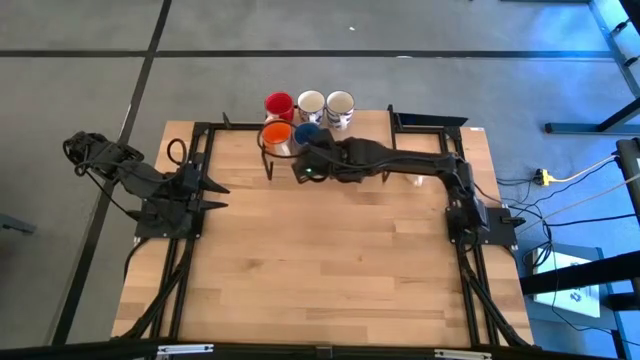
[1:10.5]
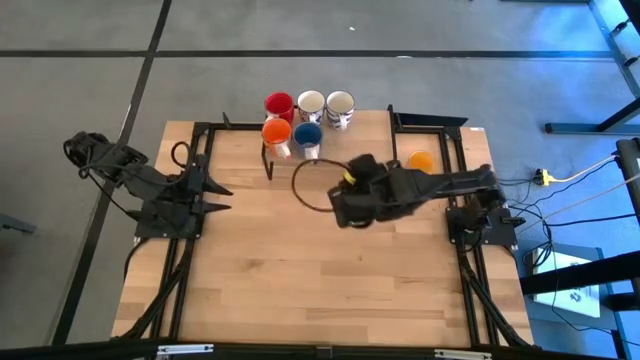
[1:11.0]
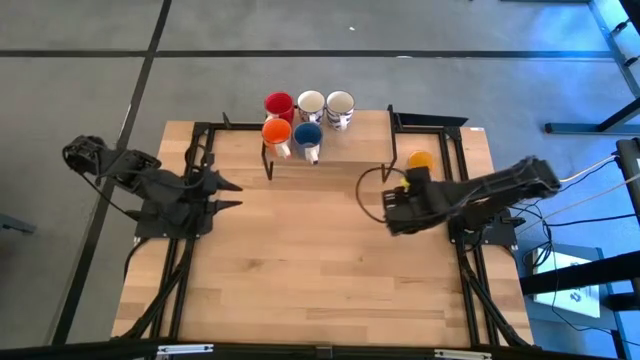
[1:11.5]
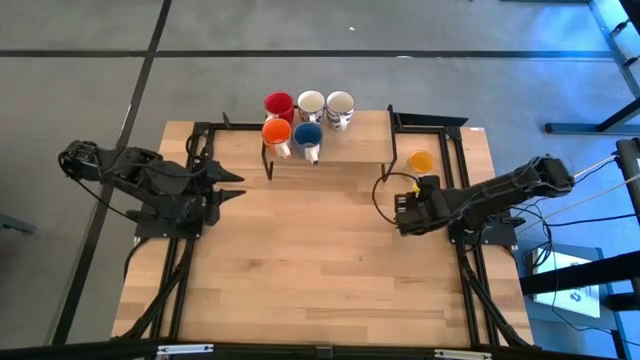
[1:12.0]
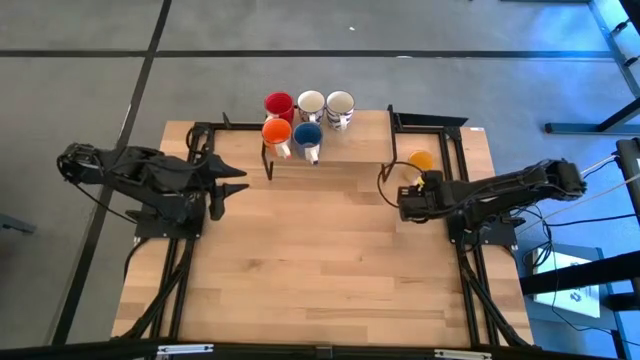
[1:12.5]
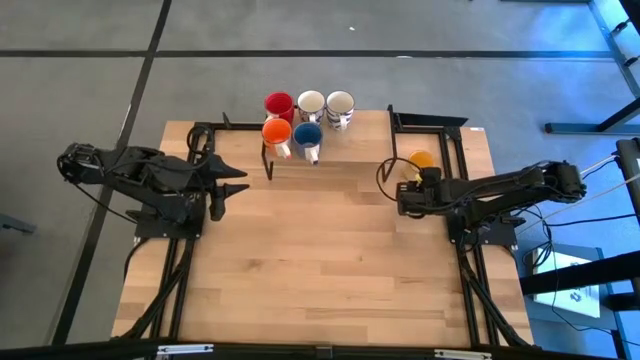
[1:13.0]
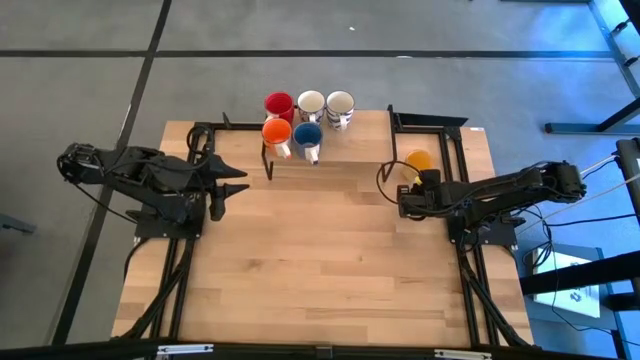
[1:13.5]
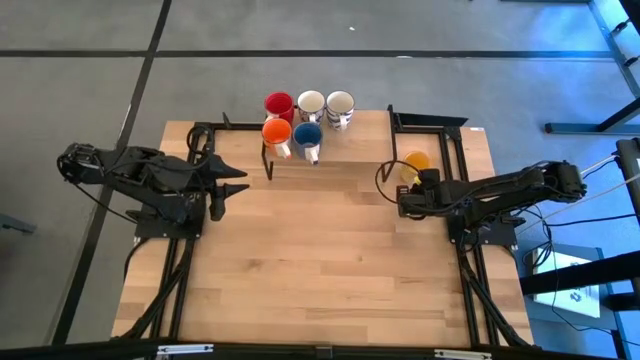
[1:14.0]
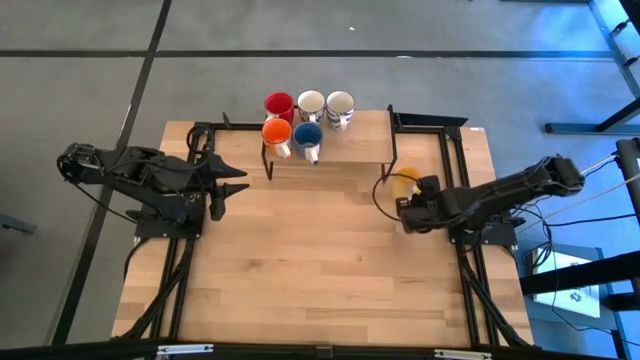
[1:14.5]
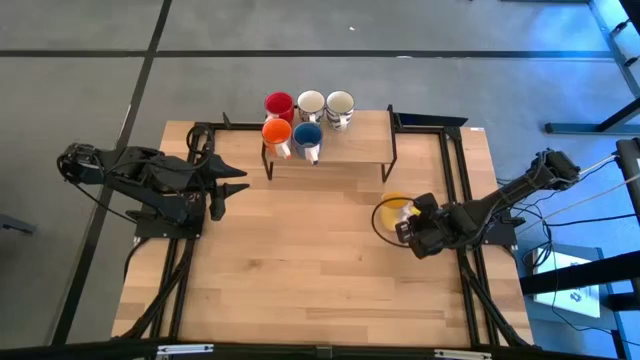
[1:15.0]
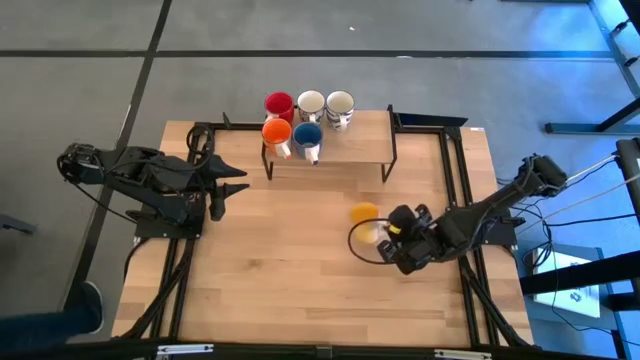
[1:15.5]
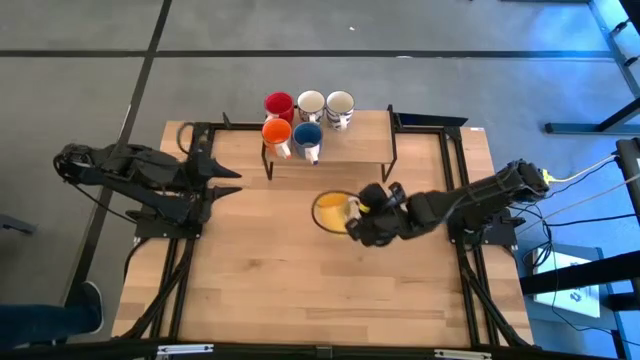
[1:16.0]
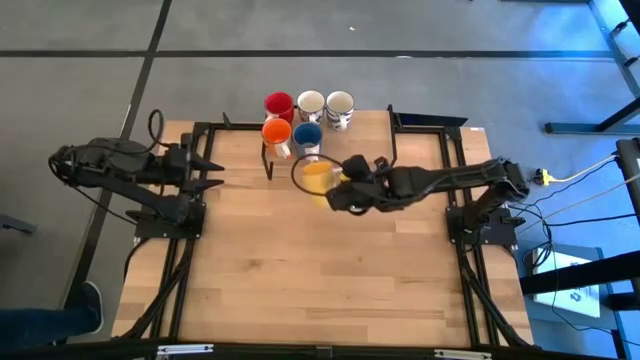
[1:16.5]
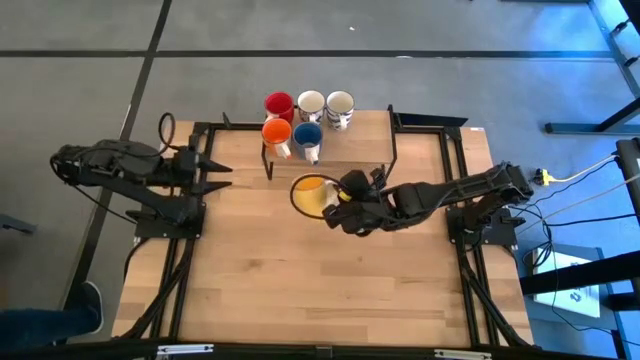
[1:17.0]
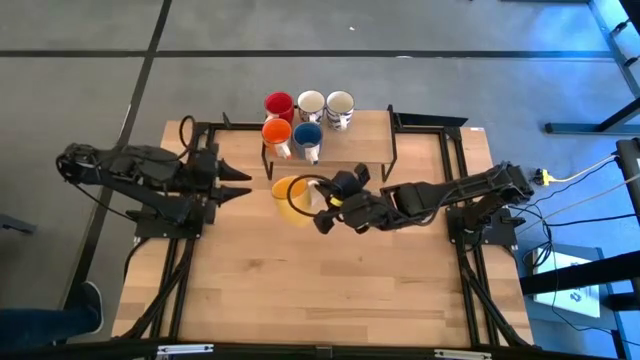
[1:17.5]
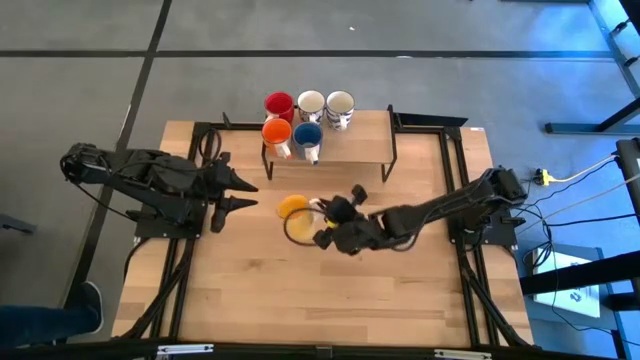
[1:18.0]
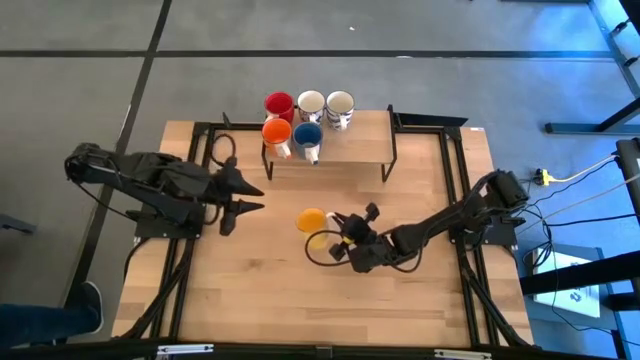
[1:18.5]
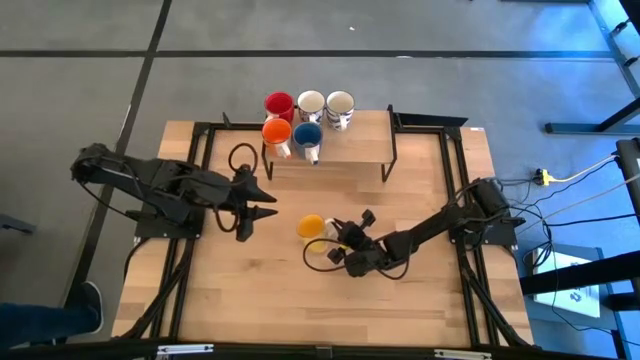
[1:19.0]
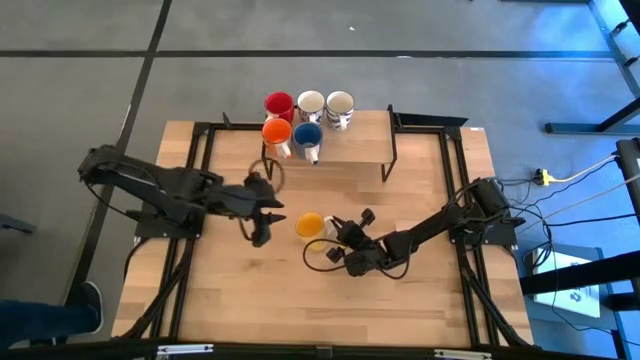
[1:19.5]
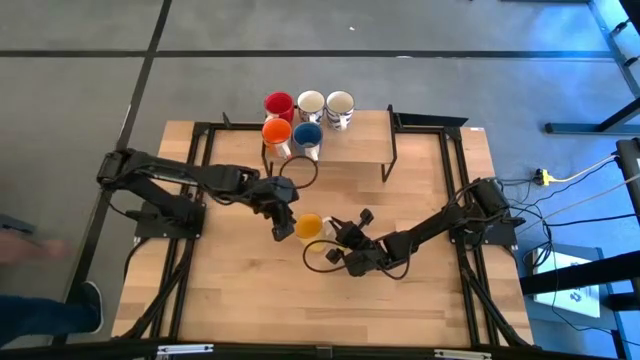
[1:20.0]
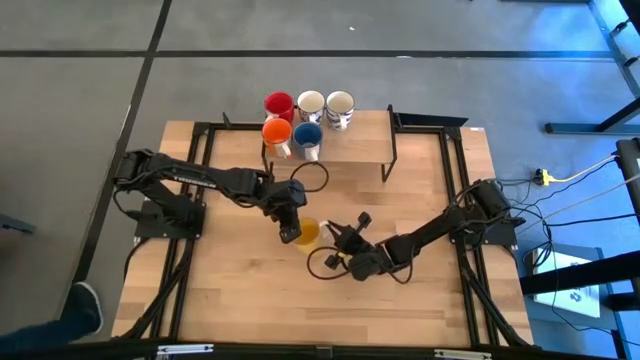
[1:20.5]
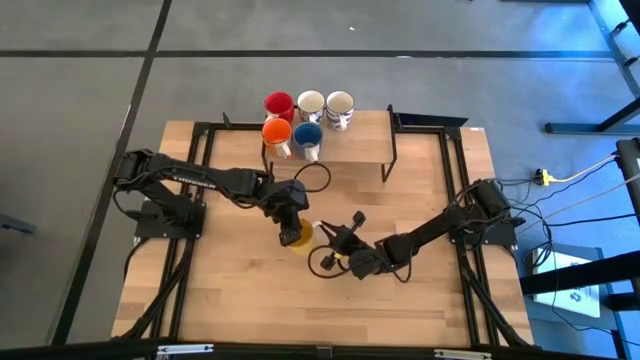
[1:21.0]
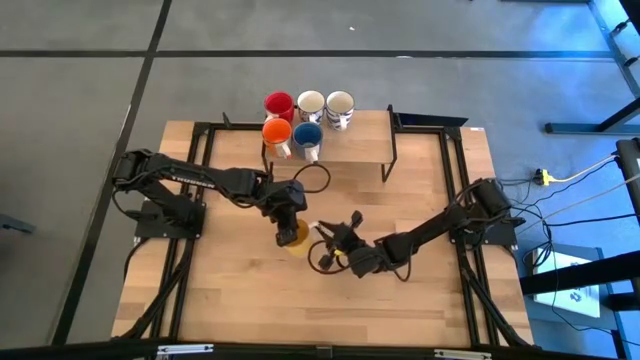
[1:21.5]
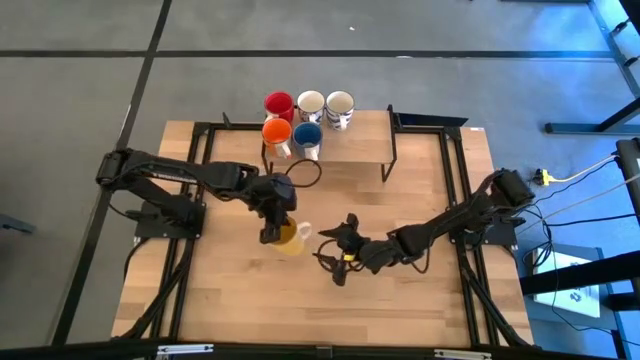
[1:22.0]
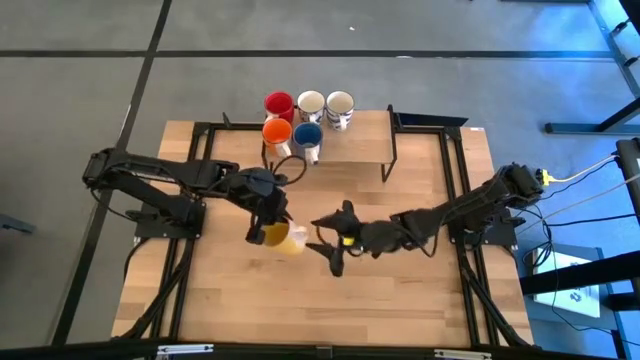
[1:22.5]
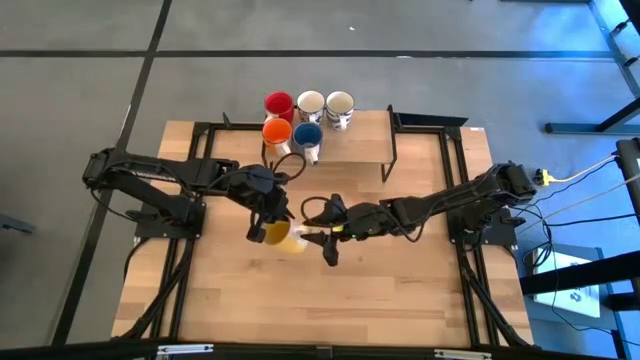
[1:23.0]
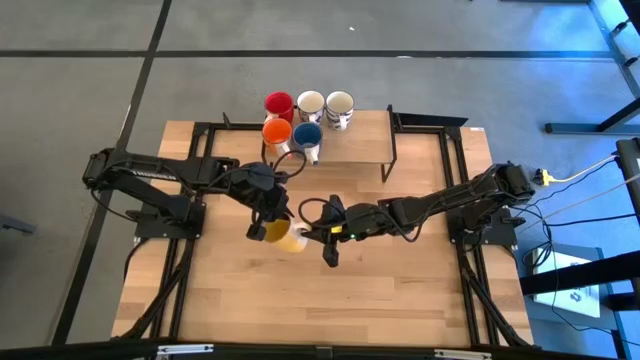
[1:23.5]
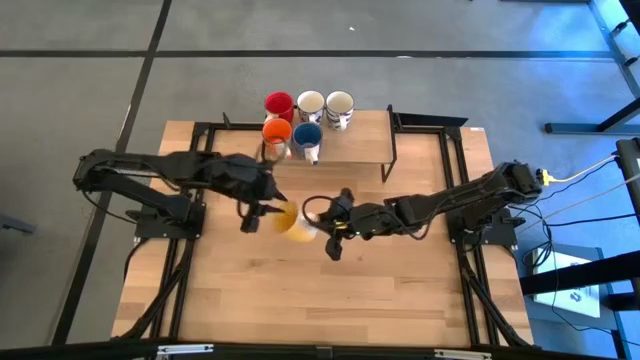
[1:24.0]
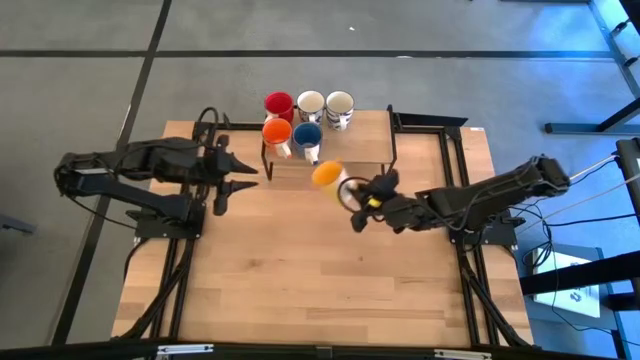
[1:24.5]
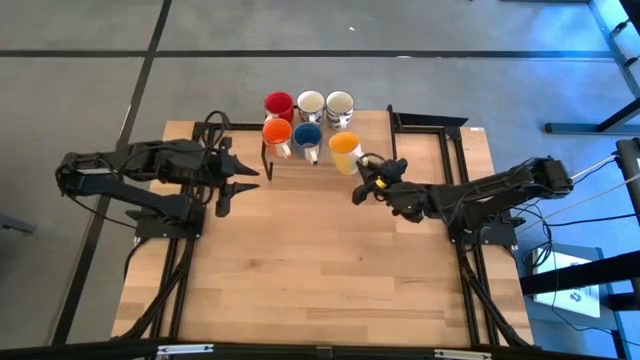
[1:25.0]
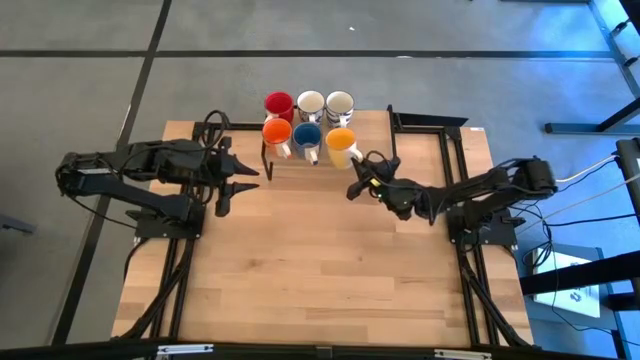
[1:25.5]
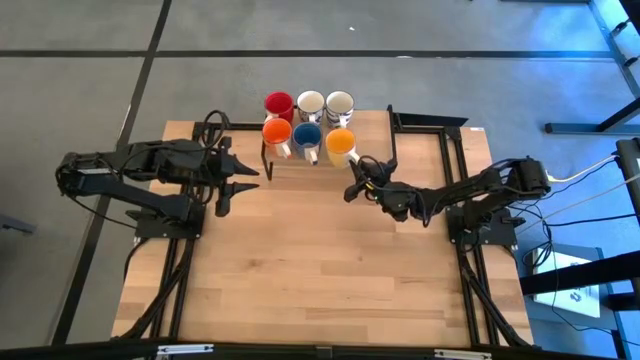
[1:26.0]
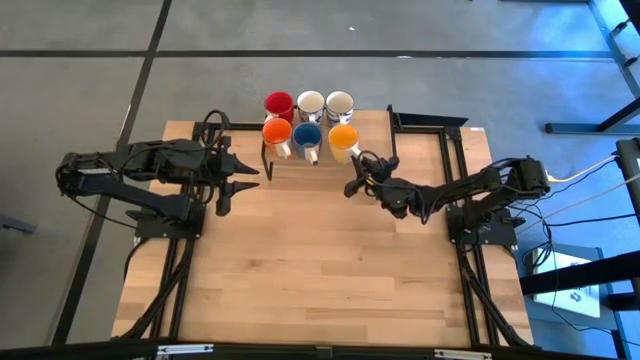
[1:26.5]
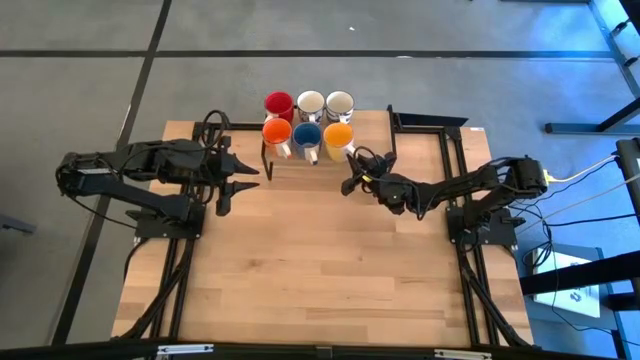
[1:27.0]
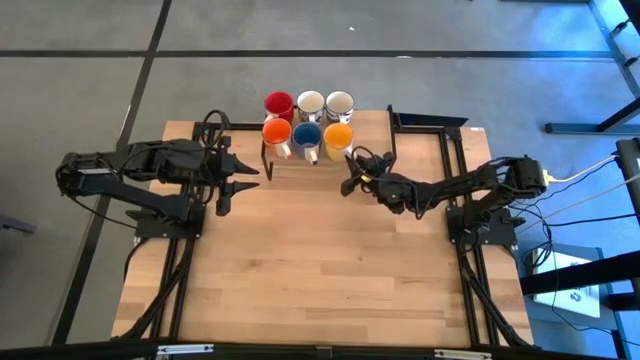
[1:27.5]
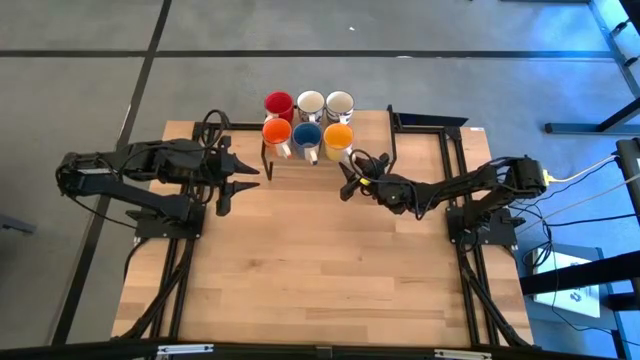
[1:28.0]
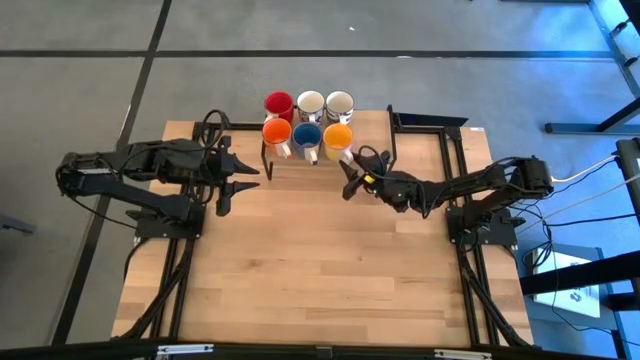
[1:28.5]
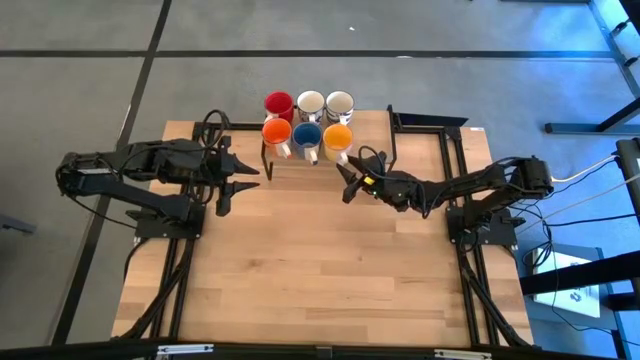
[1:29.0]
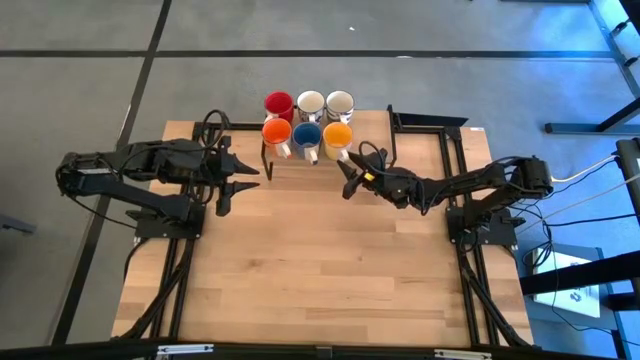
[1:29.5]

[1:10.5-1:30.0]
Task: Place coffee mugs
Put the yellow cup on the shelf

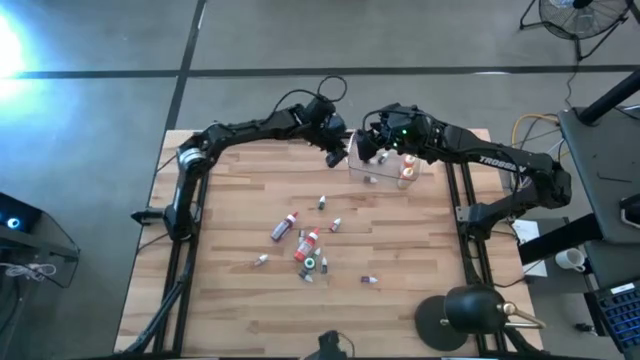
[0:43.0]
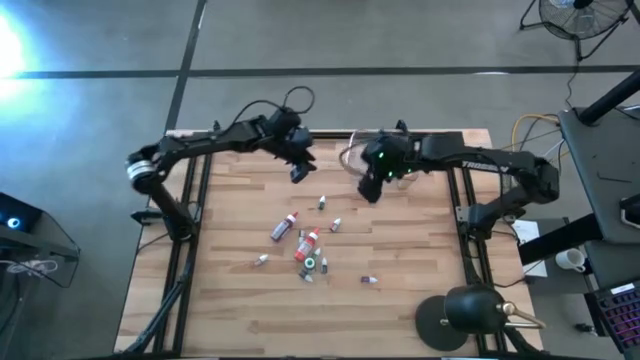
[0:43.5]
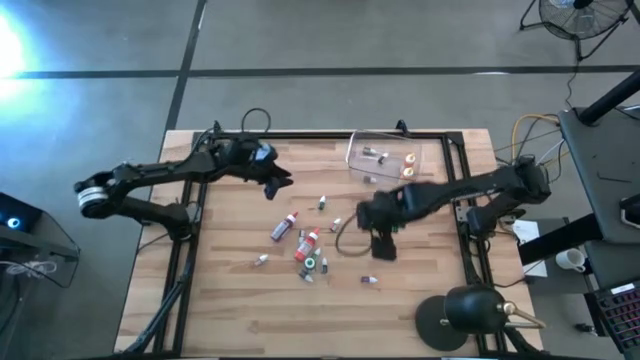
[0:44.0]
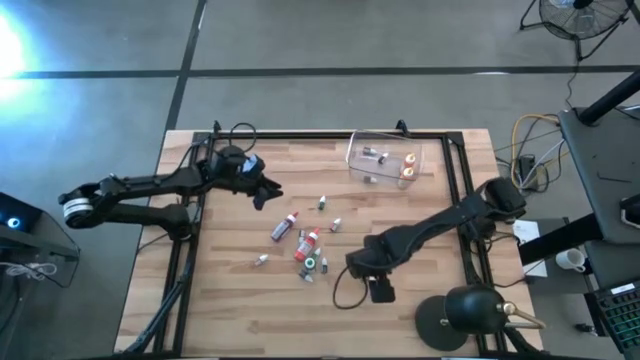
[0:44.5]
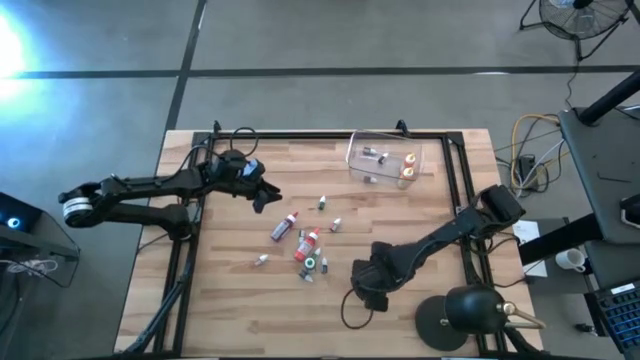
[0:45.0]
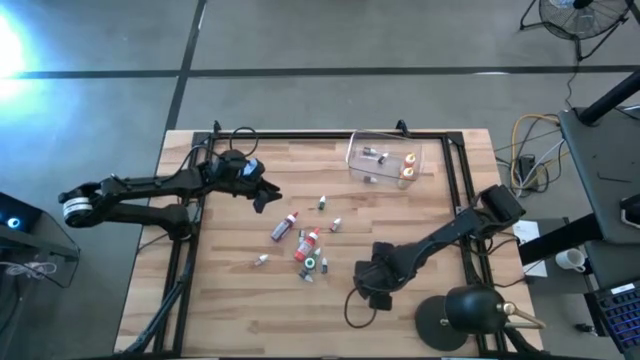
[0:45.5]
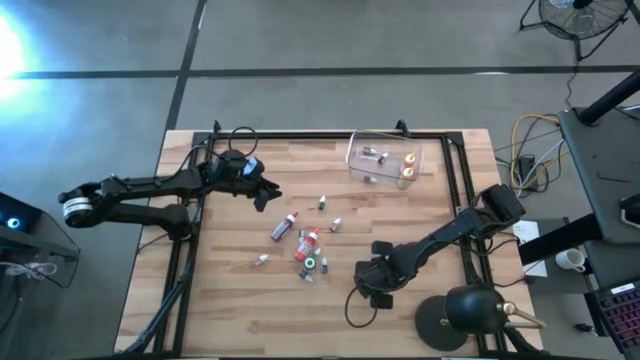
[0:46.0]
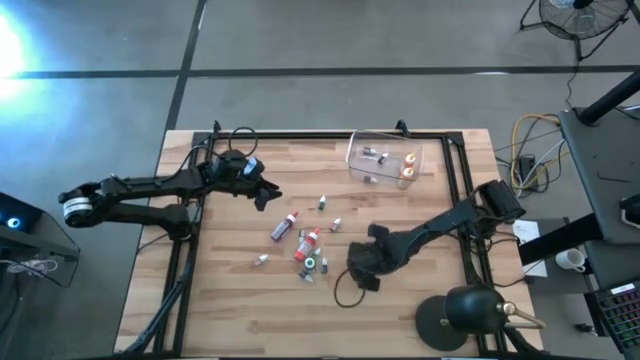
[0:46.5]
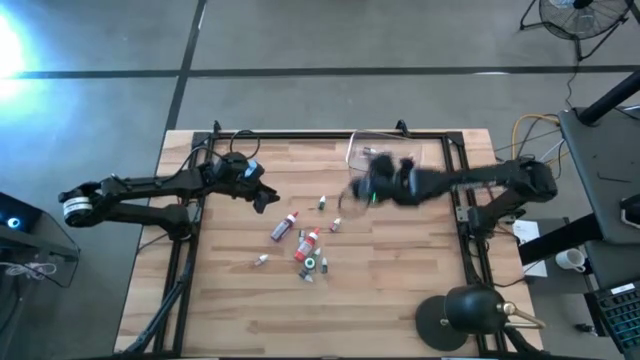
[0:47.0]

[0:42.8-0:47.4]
Task: Pick & Place food coloring
Put the small purple food coloring bottle into the transparent bin
